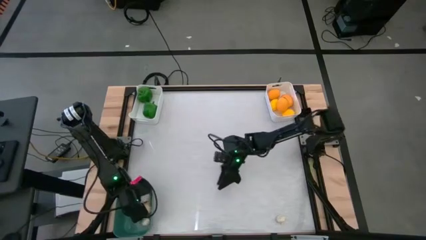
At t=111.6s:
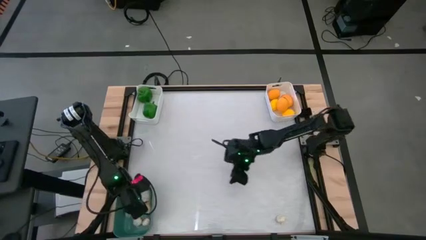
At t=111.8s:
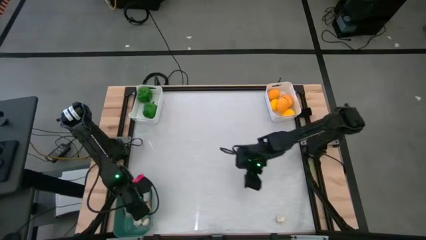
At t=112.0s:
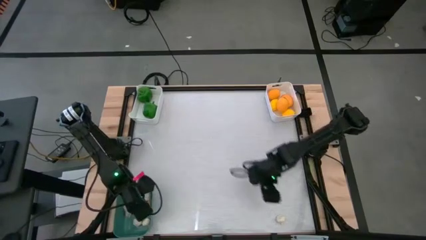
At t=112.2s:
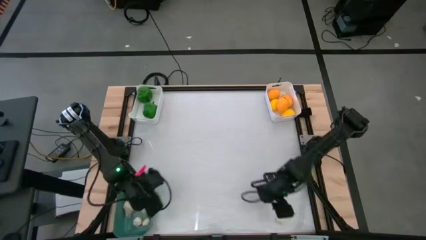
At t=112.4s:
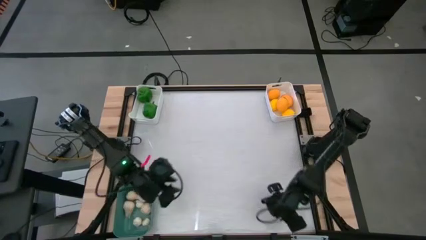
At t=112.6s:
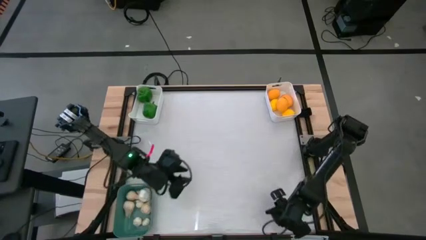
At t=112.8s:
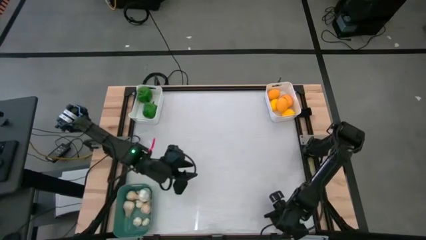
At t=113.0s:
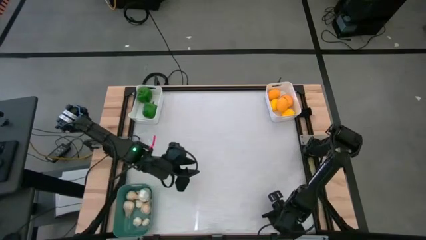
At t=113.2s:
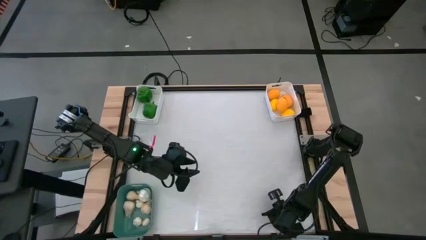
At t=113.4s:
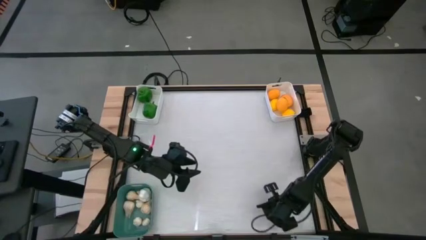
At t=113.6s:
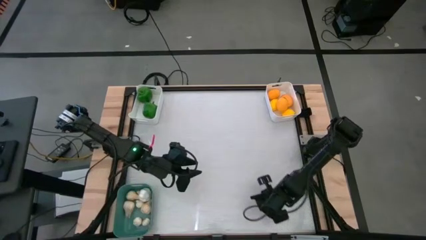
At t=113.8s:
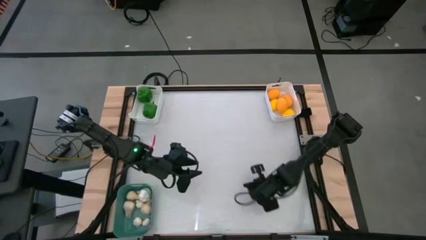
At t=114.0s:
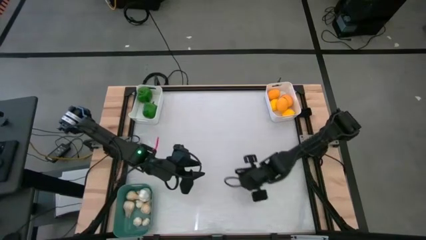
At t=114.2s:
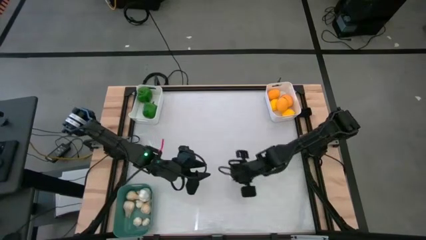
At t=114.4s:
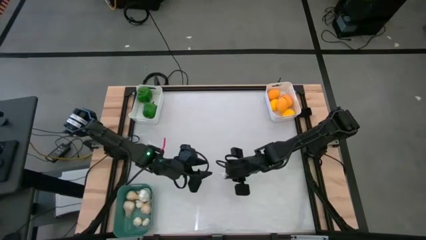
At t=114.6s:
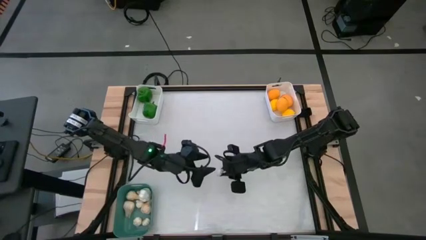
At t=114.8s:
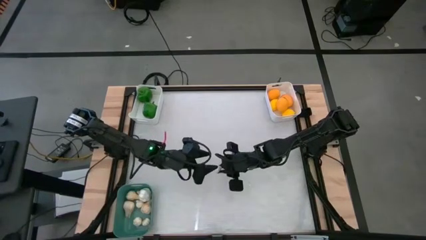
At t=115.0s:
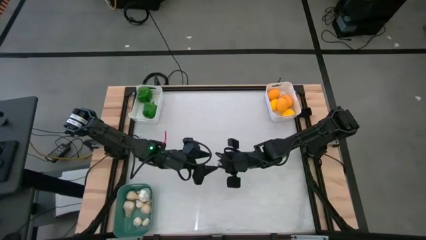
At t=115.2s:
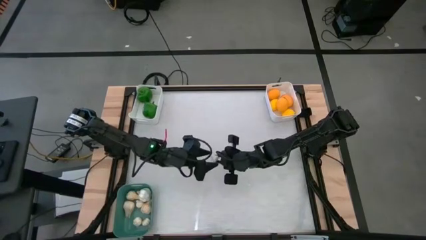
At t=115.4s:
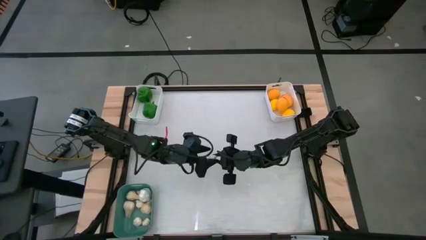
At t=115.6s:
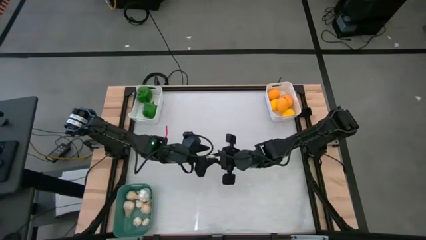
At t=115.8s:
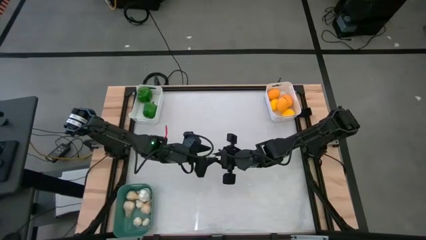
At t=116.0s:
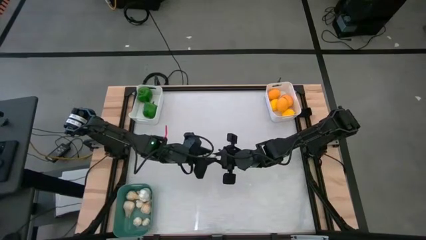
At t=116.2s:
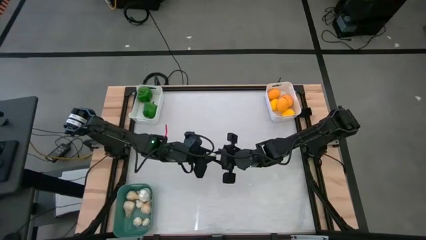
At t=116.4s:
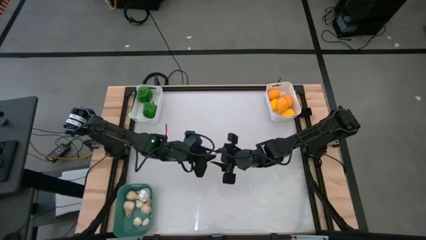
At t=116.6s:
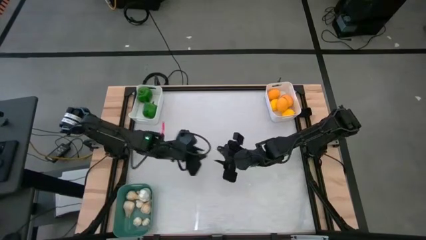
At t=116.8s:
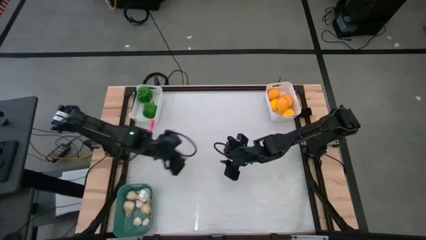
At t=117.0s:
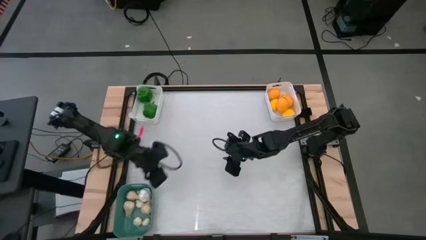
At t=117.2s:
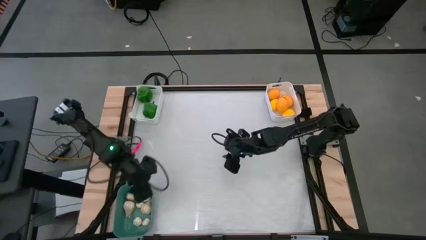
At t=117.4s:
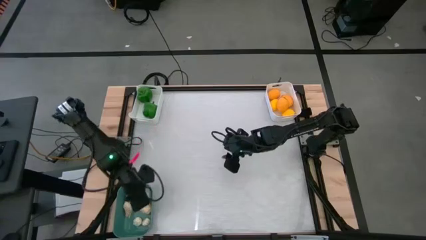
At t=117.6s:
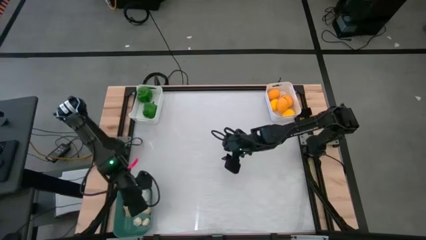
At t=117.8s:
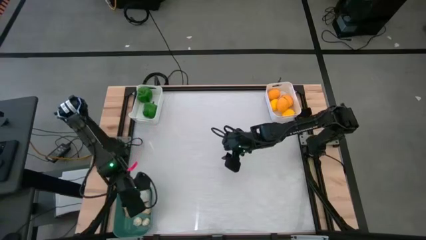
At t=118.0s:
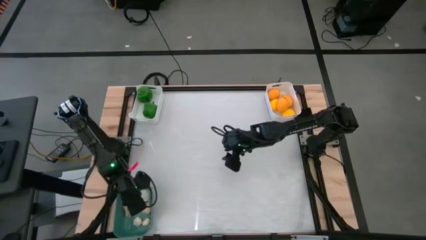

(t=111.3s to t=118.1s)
Task: Sort produce into baskets
Put the white garlic into the green bin

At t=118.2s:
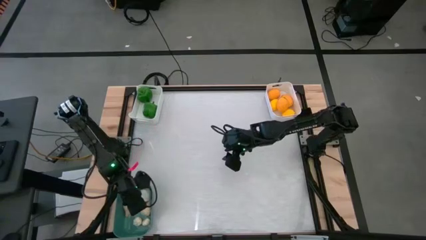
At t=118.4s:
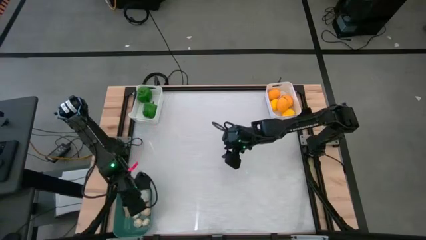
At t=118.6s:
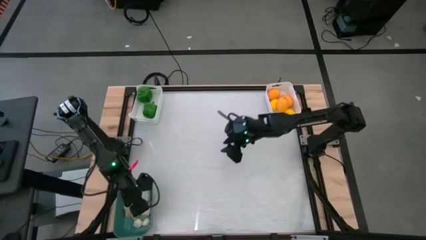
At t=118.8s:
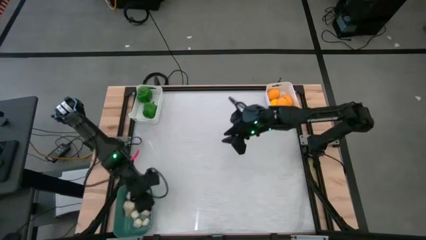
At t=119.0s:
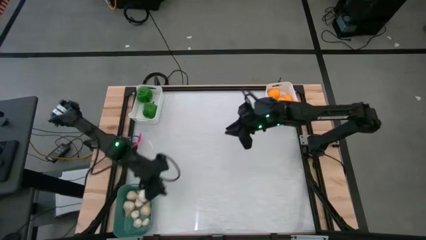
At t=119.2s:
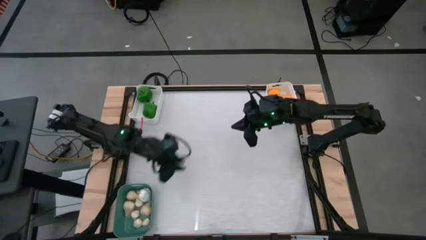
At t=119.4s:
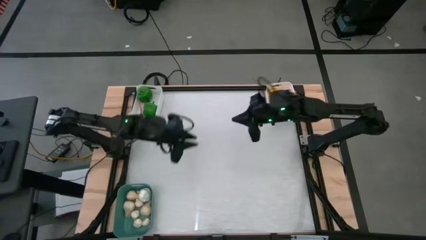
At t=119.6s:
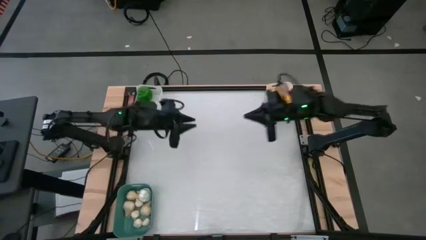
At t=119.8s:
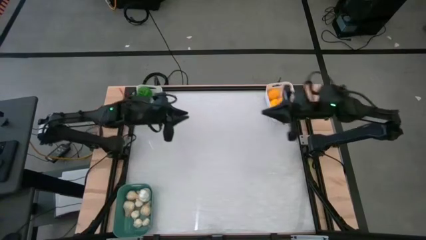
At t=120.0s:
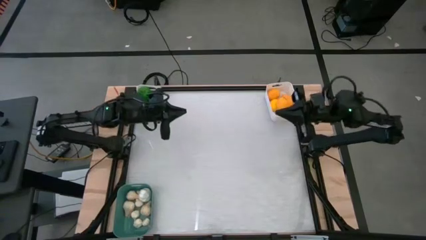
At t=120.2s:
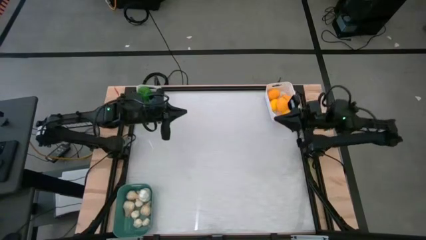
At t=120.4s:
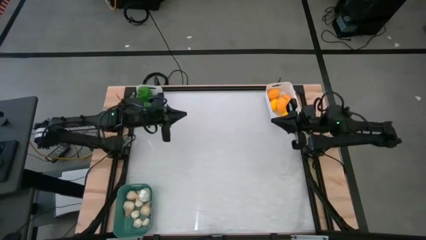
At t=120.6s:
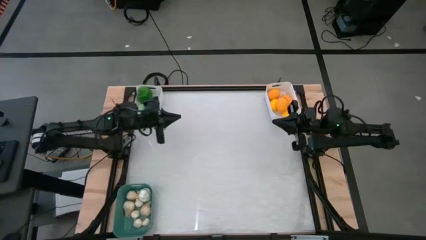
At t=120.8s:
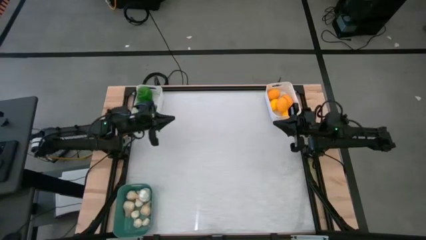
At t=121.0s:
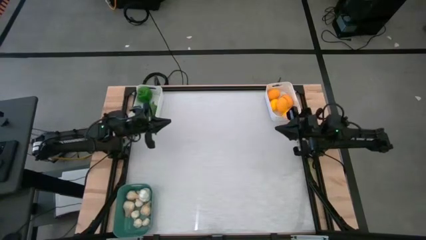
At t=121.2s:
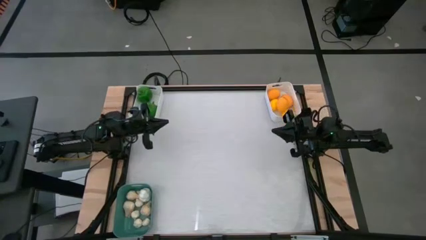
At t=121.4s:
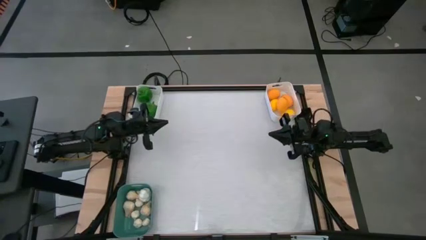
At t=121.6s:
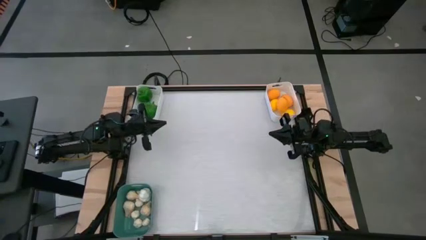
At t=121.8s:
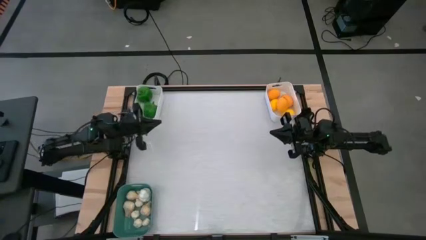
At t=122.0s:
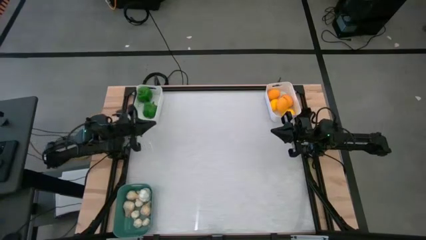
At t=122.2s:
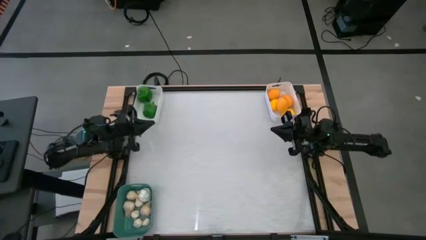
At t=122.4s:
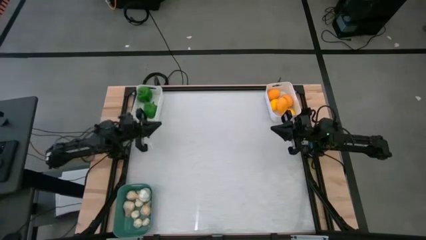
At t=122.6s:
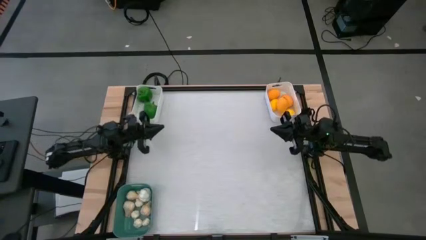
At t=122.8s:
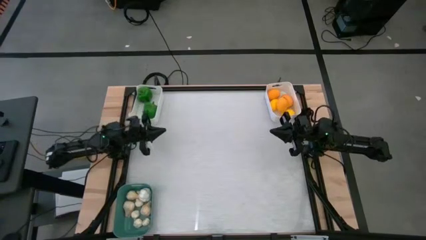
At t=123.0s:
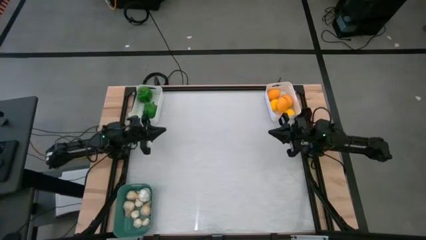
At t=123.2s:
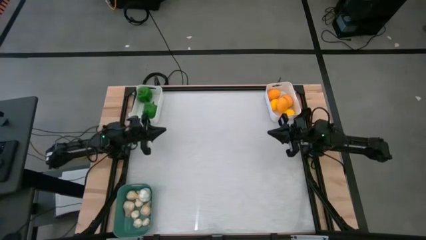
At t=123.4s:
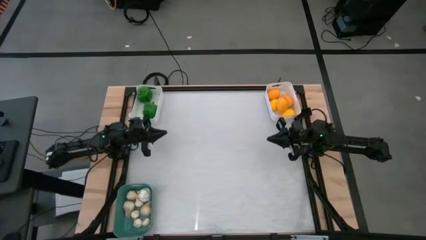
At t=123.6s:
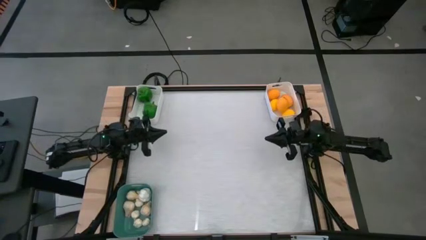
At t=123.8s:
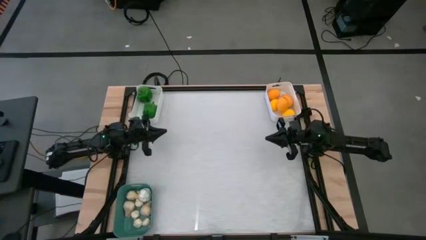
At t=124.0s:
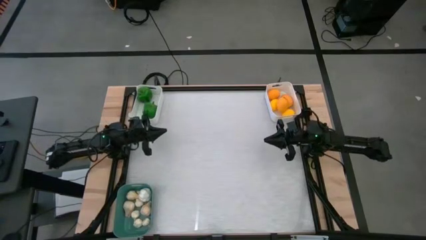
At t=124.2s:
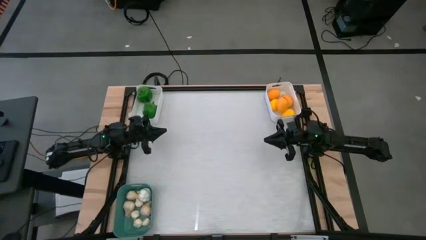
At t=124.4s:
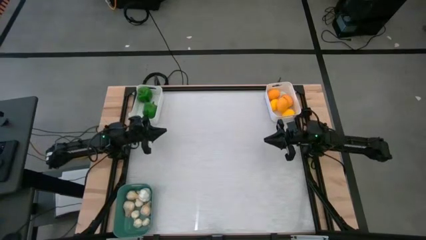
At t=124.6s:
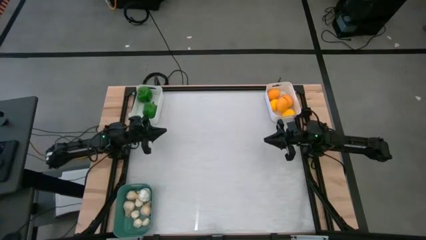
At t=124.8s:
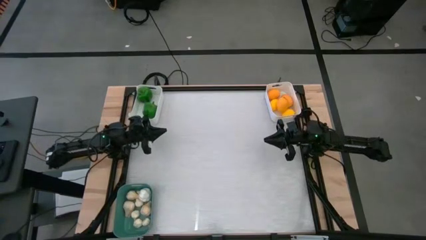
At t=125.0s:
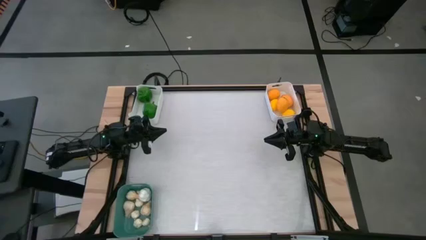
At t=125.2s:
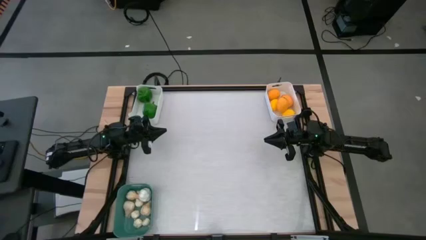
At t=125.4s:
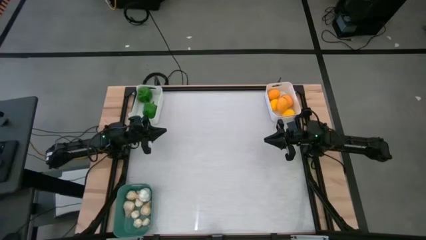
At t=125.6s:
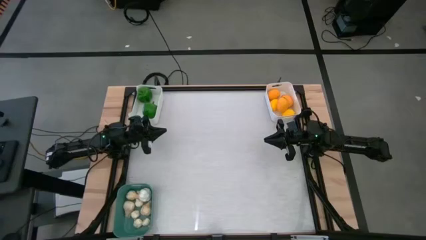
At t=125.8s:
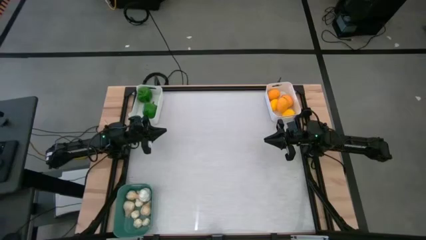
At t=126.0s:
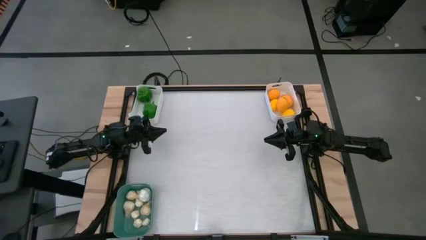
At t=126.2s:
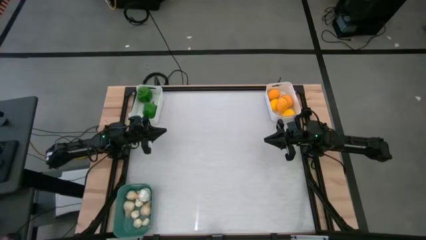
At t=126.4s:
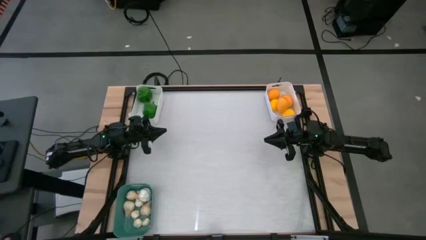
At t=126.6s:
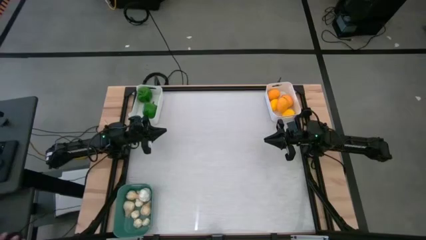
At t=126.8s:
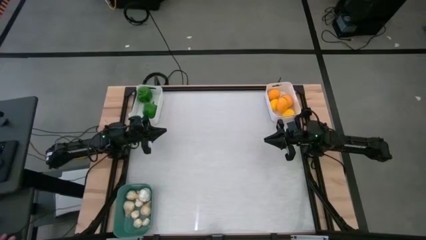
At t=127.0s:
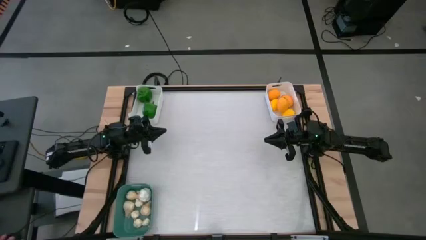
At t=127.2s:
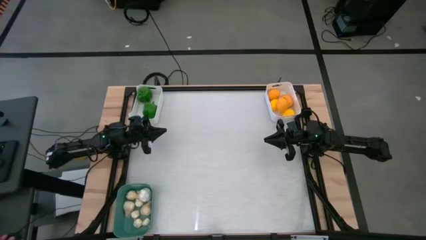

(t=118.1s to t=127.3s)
Return to Home Position
